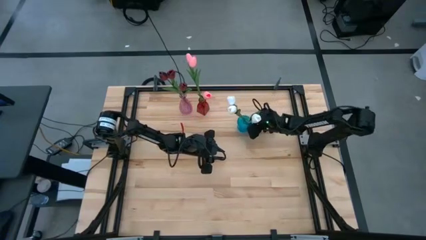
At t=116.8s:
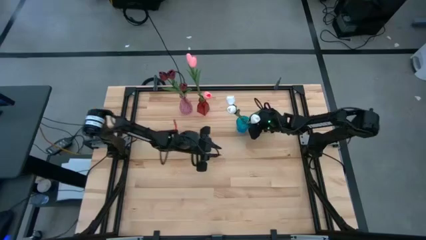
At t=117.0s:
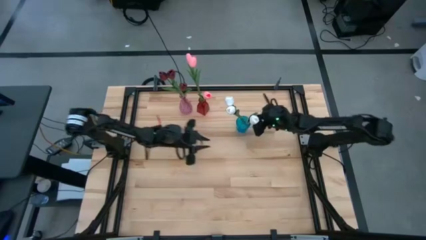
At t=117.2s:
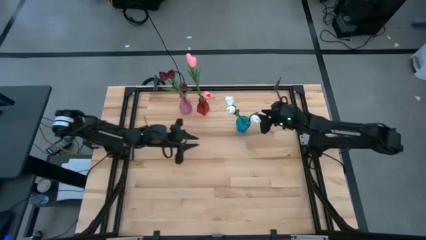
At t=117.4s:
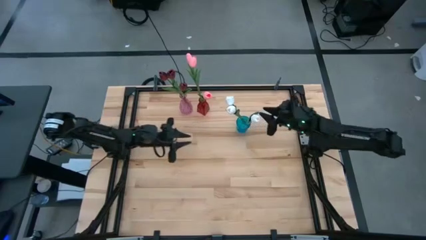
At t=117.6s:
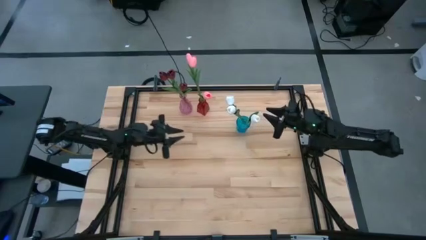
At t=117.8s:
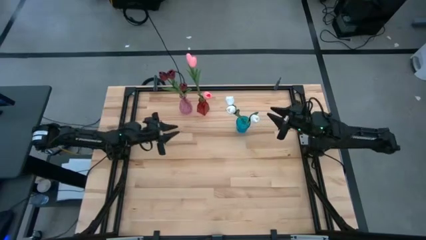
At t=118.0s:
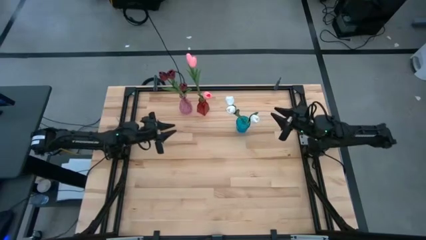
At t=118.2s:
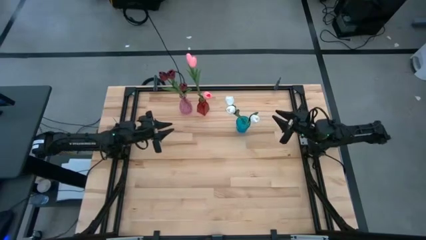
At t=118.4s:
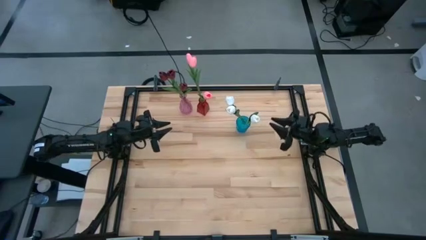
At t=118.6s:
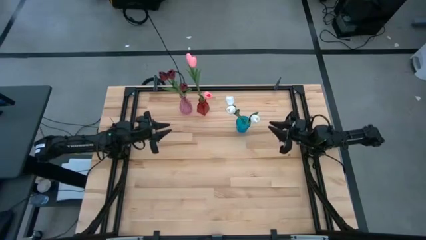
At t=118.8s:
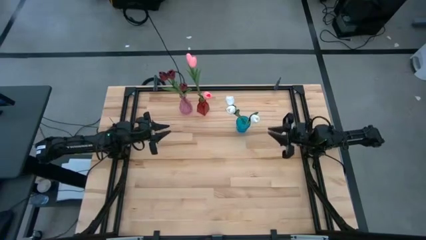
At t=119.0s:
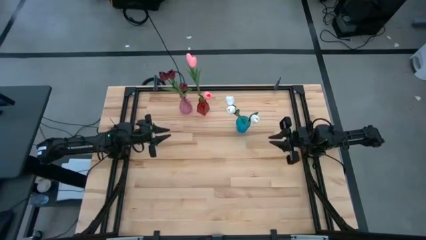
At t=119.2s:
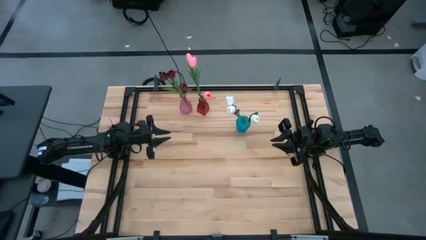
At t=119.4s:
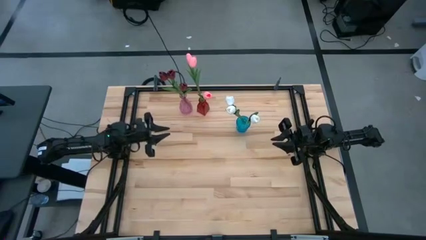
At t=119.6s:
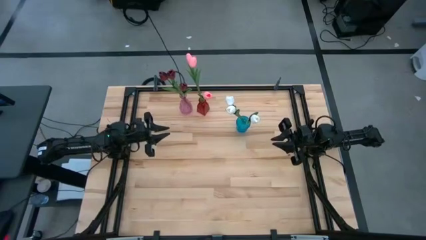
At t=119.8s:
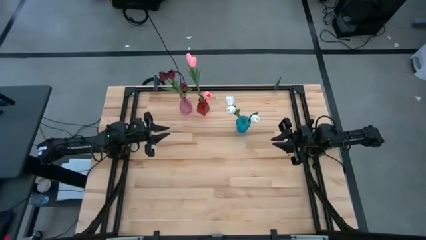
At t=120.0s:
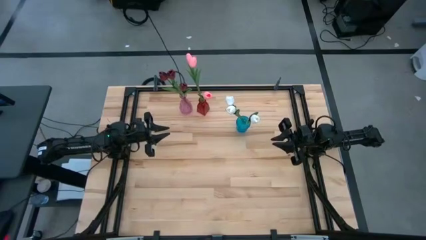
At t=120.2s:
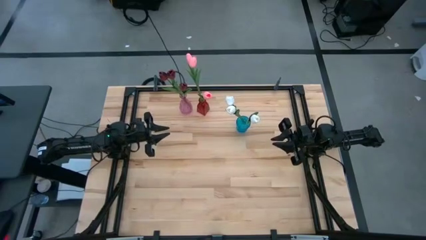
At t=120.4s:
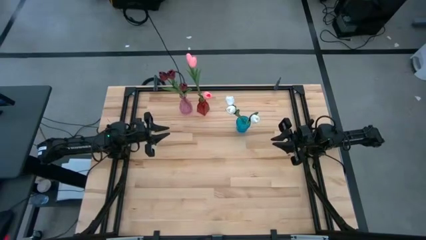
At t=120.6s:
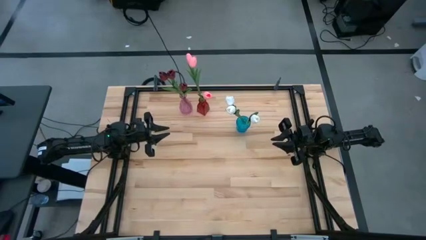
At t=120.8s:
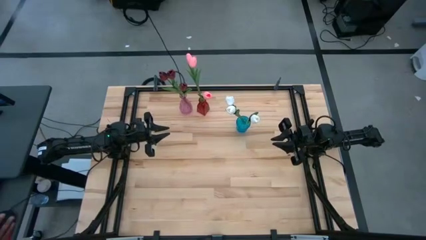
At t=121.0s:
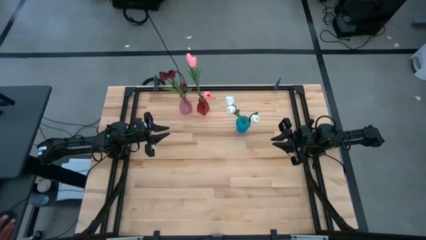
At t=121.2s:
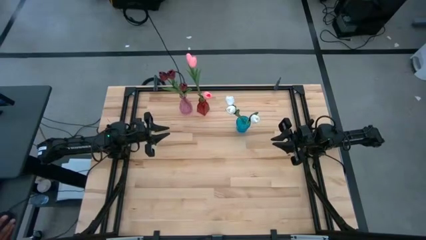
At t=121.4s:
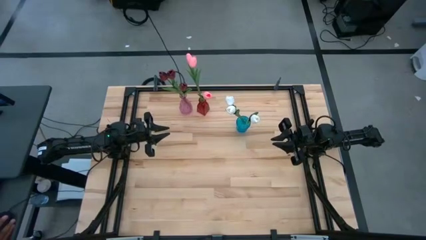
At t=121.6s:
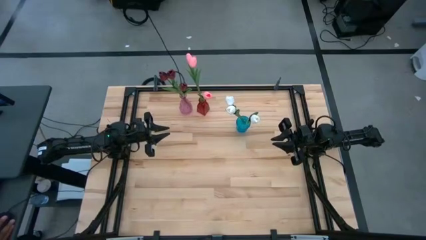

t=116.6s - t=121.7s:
Task: Sort flowers into vase by color
Return to Home Position

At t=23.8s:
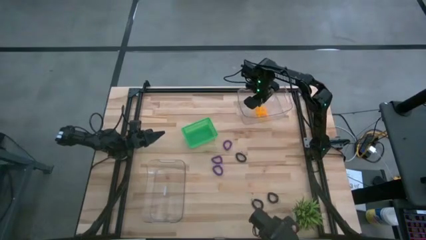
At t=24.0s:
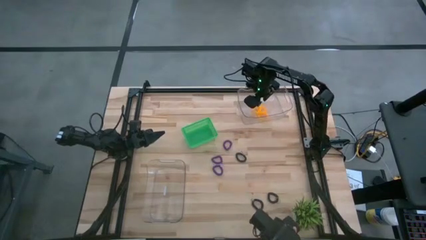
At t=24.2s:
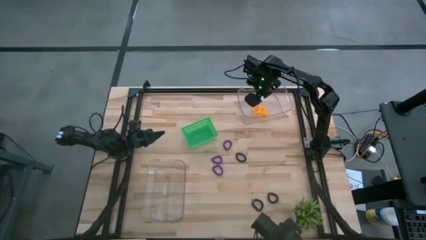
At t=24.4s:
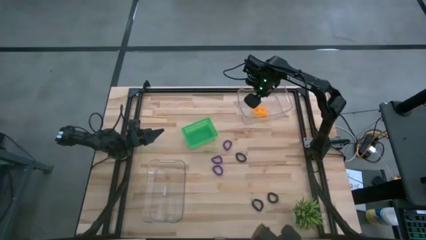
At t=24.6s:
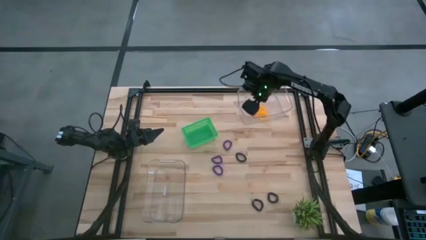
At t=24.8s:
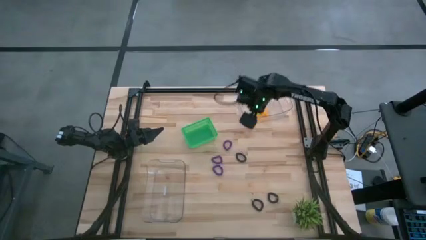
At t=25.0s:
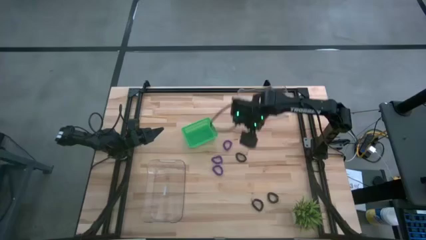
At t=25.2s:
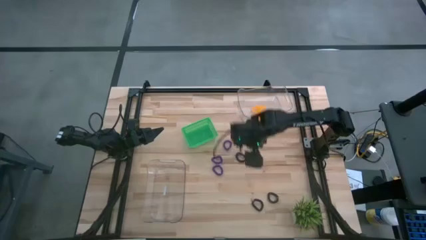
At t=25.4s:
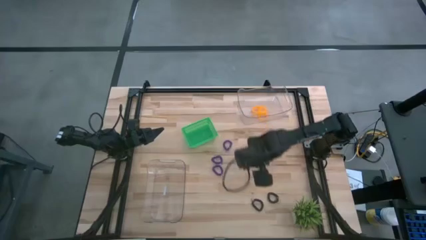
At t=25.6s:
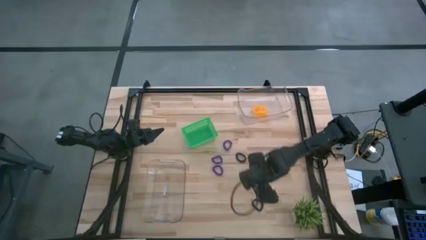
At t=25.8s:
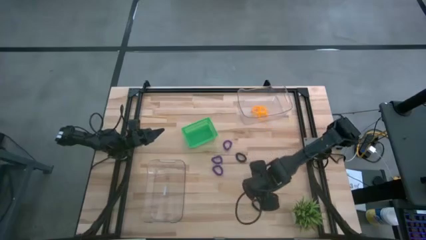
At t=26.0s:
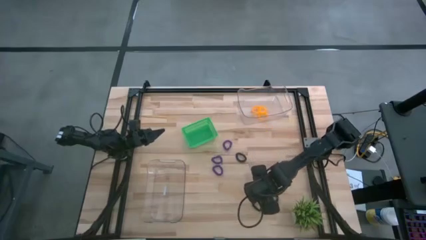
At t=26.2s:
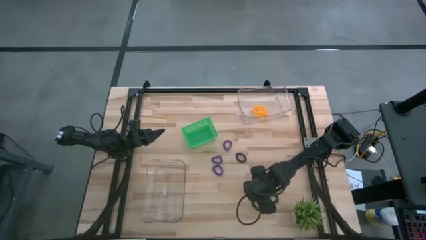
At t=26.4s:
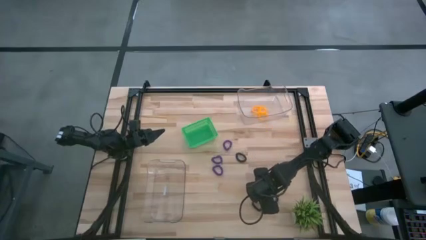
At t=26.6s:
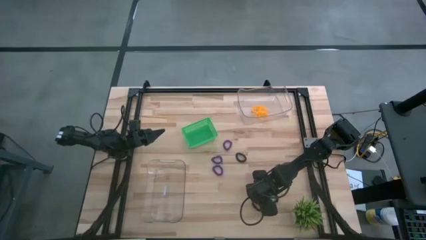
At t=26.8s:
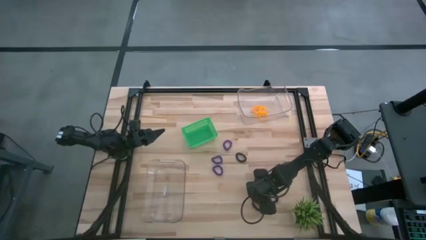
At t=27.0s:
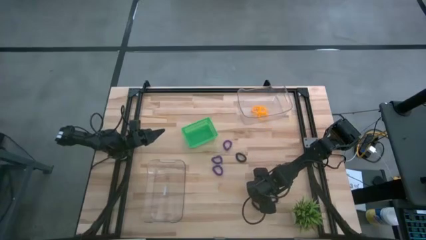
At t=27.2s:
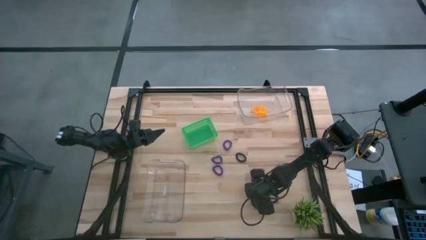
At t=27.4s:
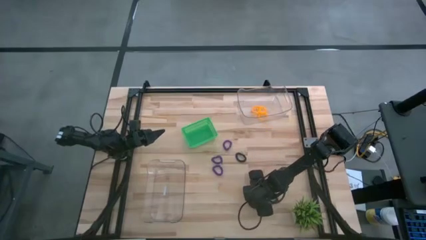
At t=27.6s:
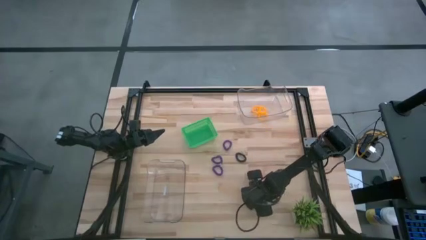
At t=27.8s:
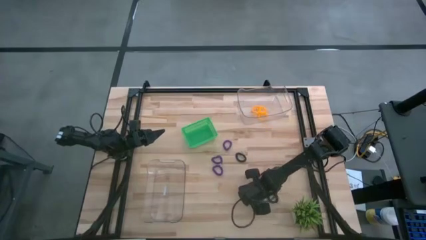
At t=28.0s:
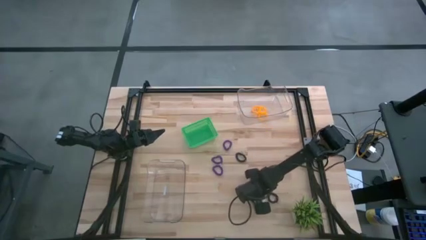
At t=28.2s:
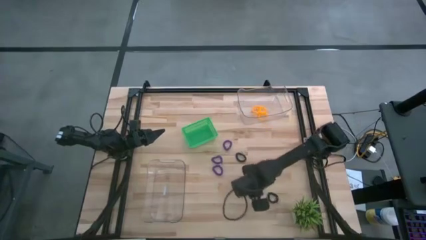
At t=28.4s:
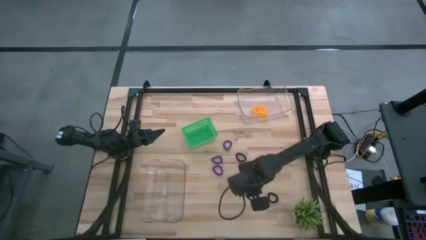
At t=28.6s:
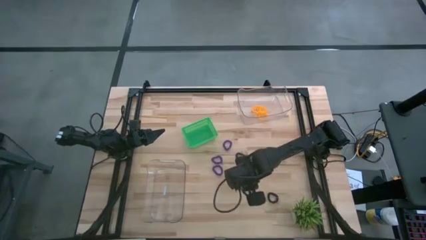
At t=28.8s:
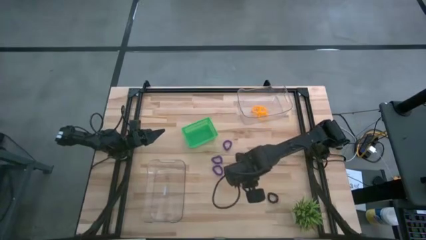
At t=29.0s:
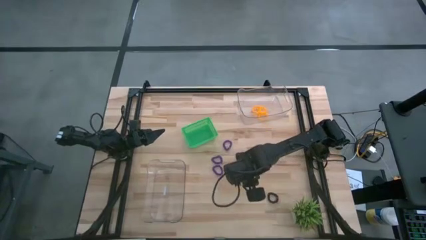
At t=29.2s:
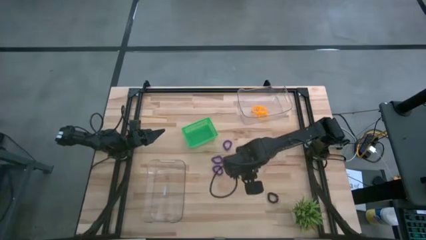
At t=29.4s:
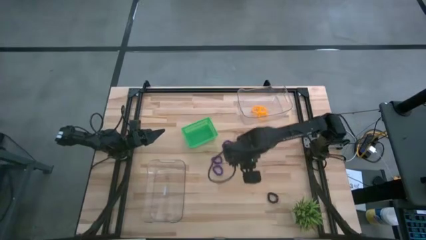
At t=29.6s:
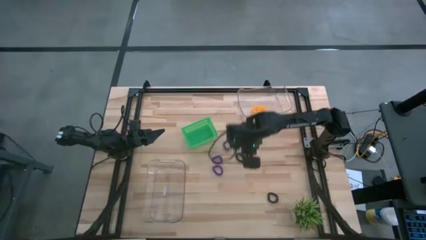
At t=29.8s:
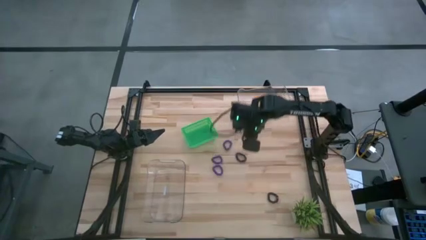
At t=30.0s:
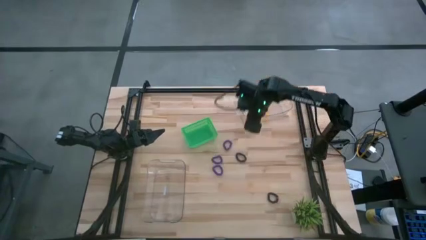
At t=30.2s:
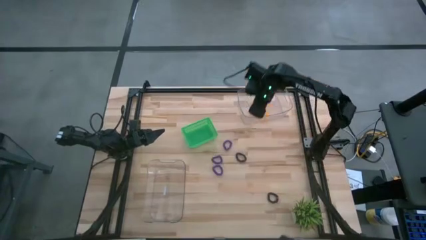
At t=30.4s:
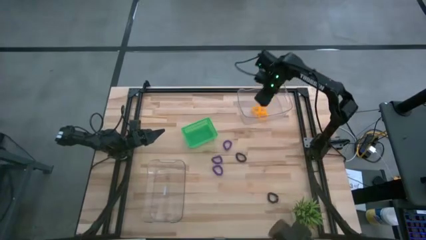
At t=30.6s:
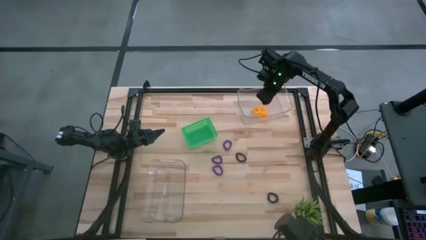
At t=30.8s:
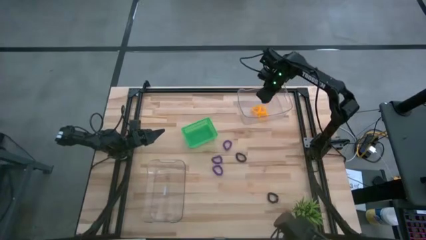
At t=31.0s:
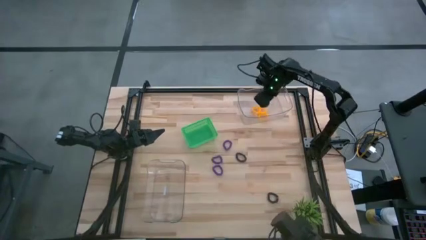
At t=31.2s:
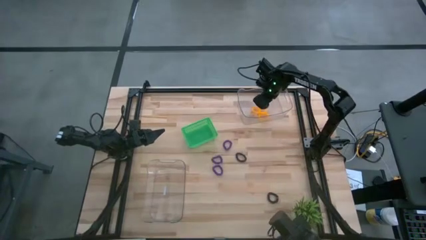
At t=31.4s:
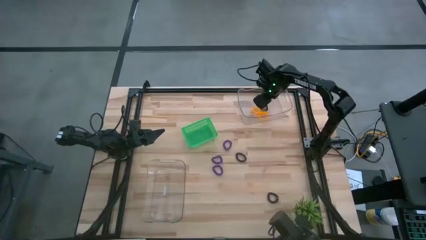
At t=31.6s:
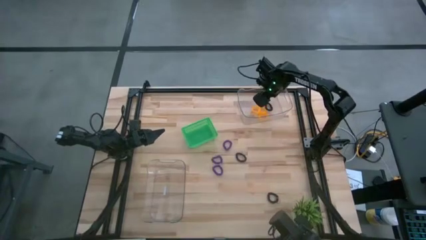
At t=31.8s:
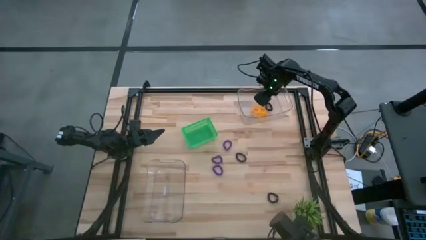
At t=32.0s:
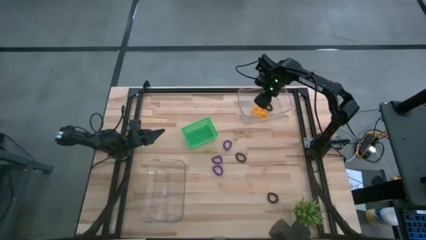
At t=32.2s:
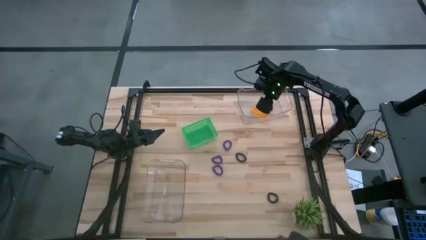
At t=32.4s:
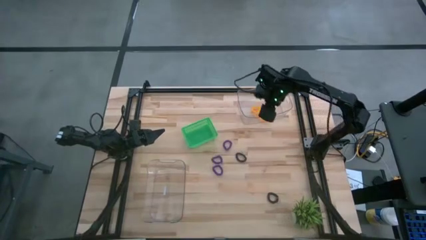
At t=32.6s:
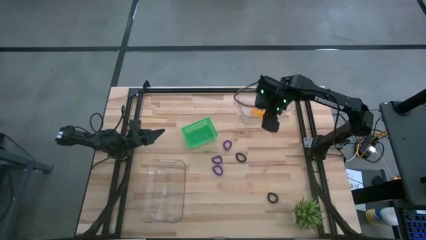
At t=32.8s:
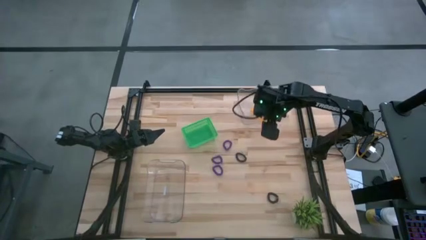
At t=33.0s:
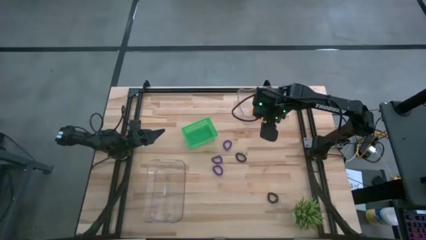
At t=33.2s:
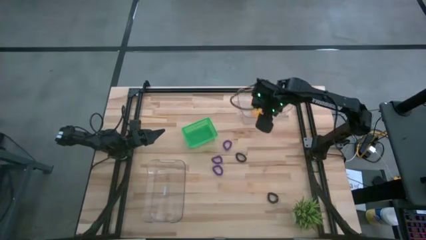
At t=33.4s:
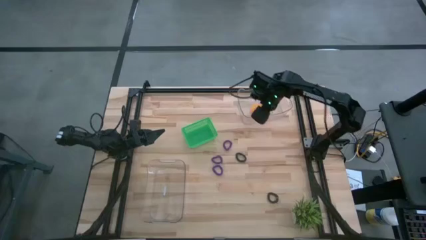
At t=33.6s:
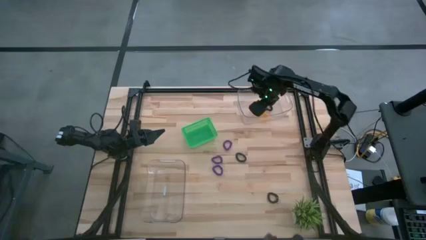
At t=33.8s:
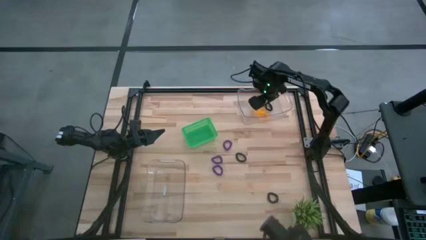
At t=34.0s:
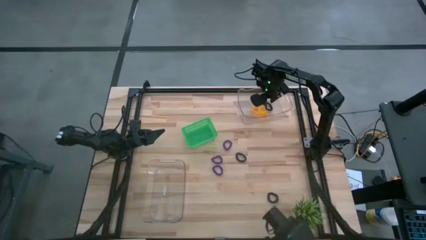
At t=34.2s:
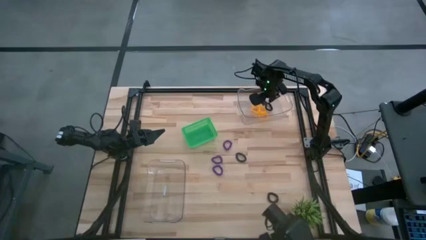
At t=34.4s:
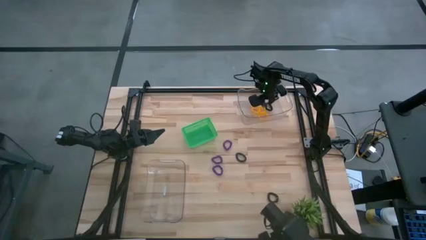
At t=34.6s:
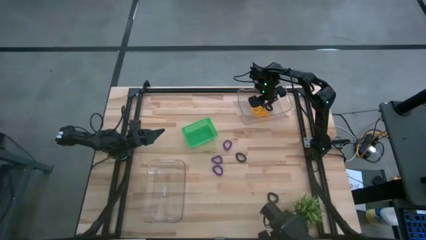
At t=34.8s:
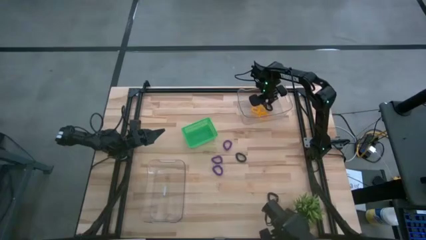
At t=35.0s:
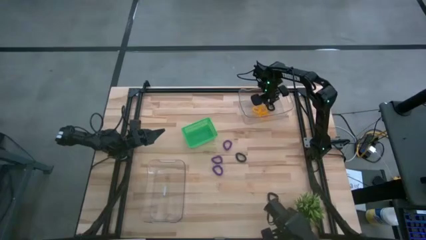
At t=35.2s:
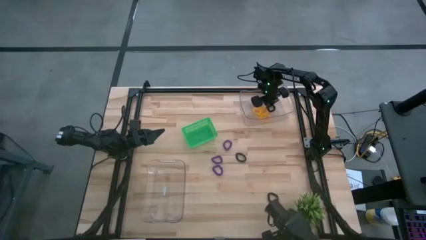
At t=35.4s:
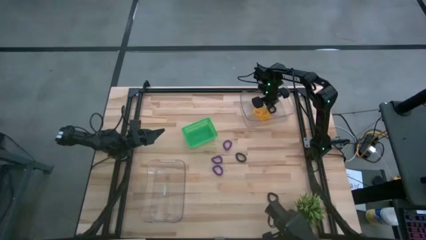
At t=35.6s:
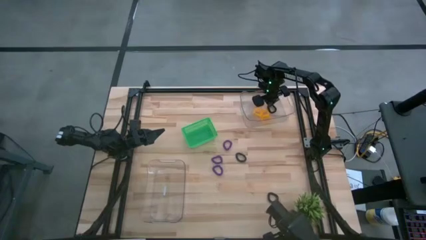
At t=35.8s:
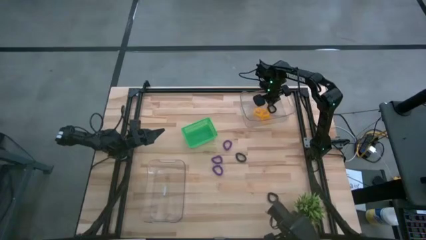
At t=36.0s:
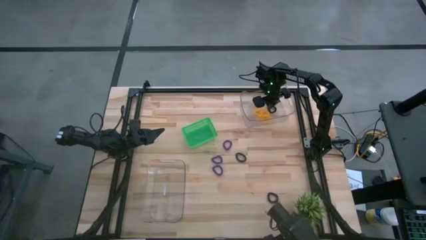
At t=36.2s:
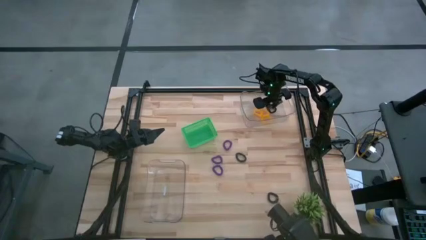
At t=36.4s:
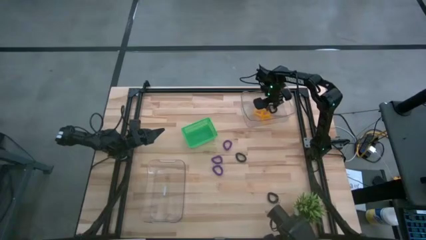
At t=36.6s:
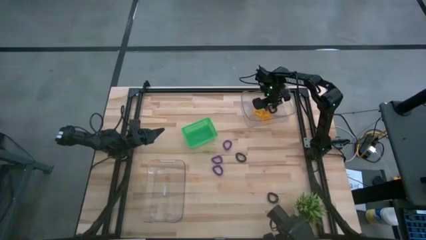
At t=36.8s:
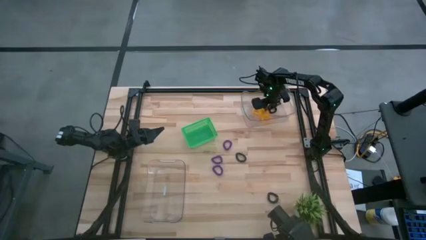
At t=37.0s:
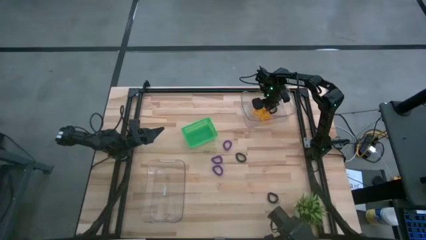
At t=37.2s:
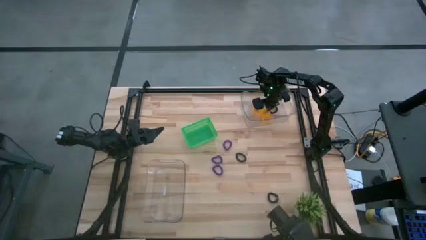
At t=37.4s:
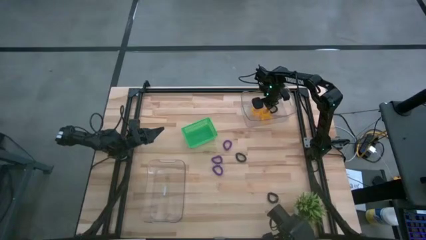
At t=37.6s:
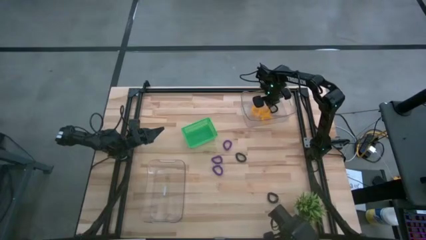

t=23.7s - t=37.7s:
Task: Sort spring keychains
Put the bottom black spring keychain into the green bin
